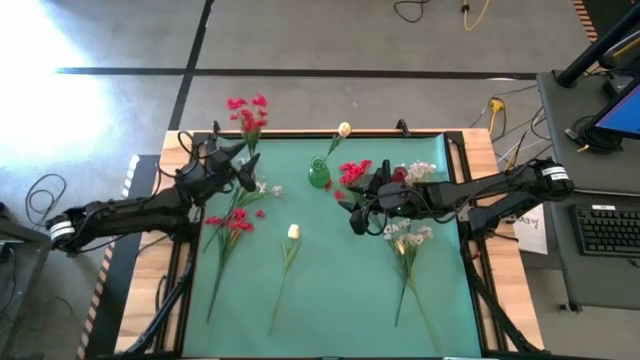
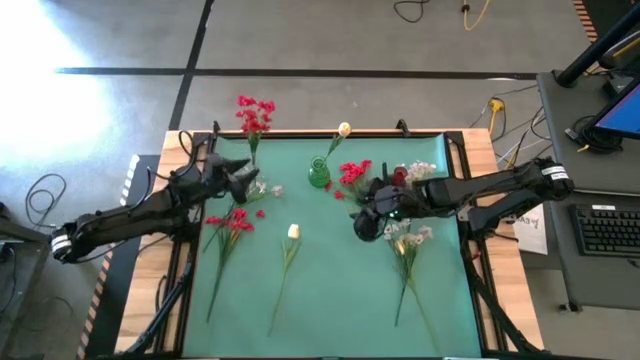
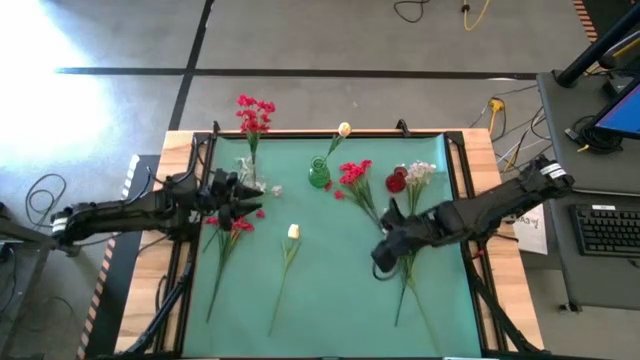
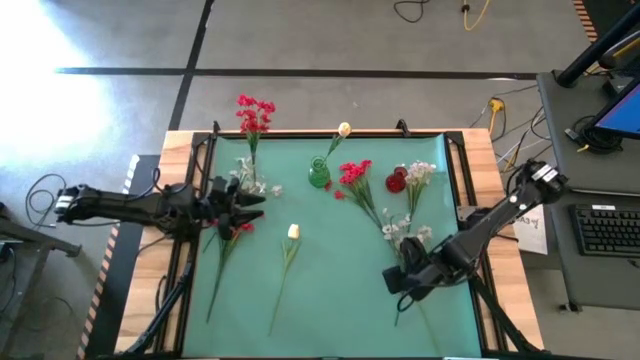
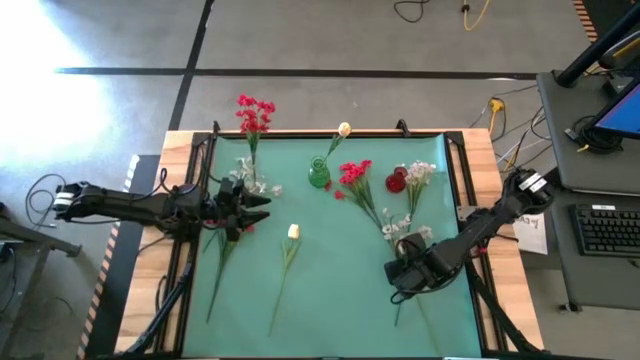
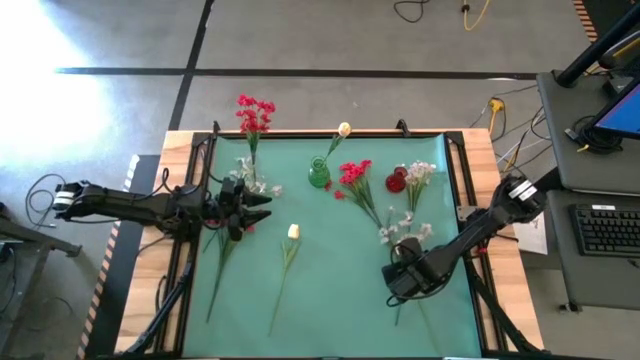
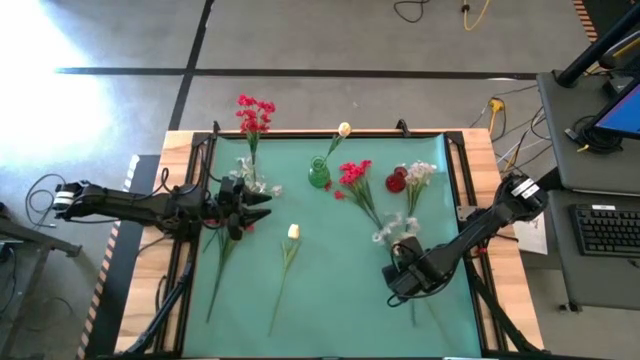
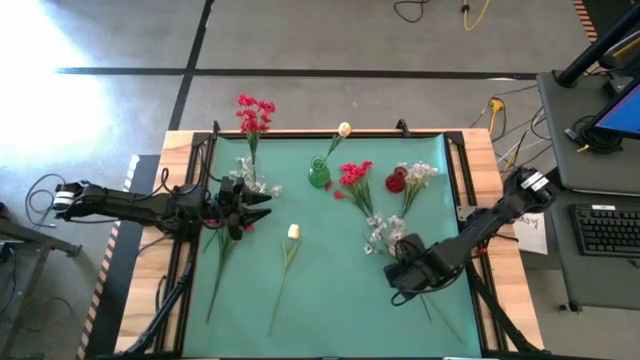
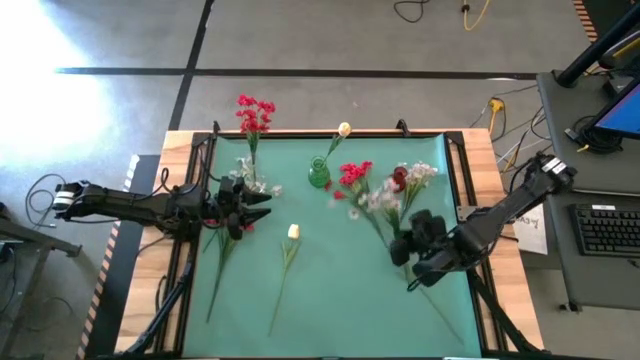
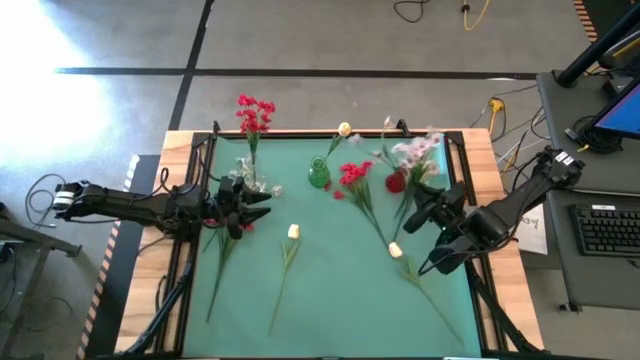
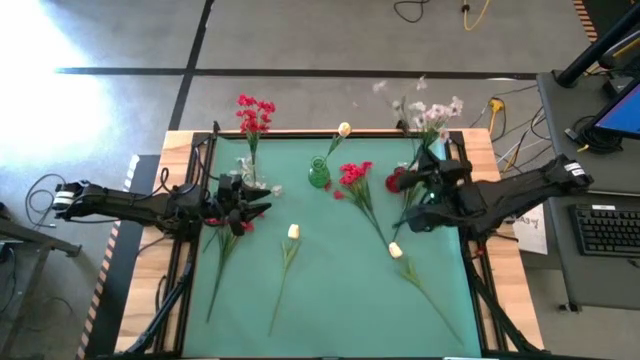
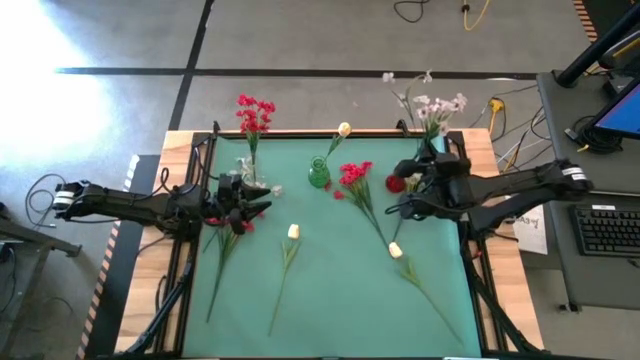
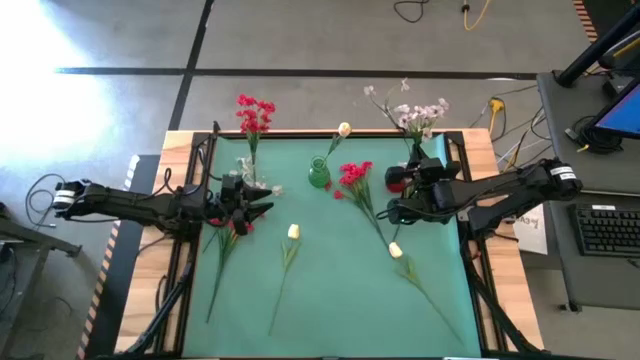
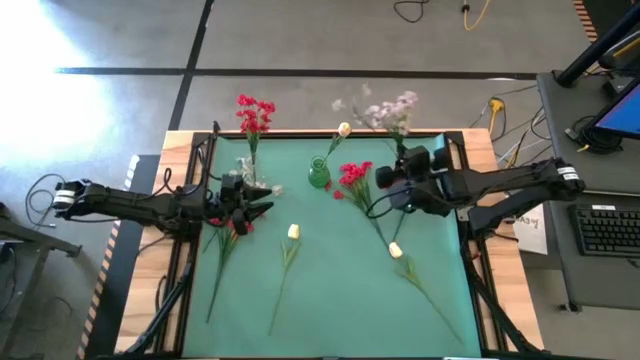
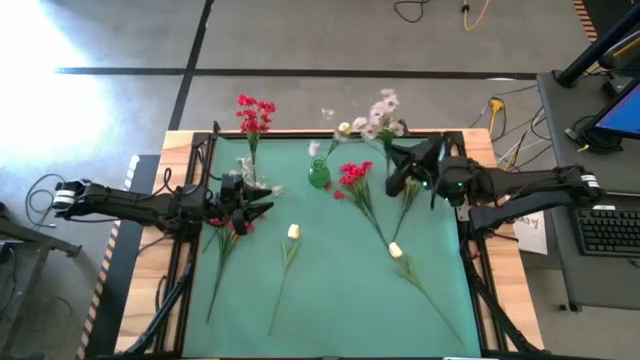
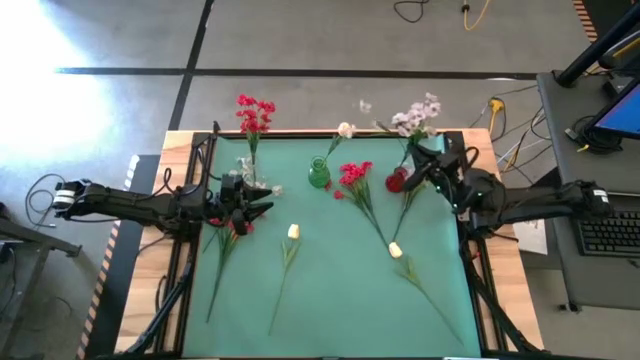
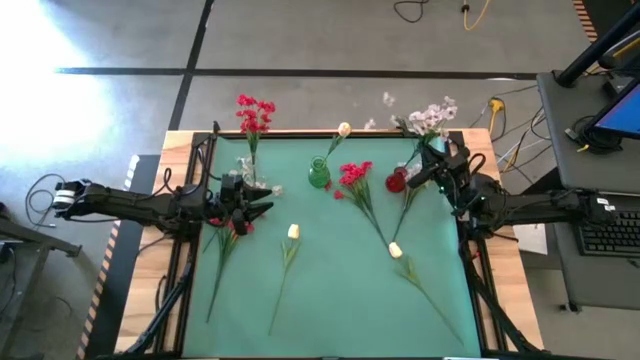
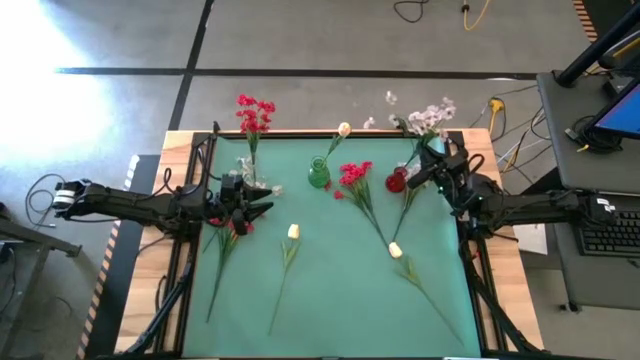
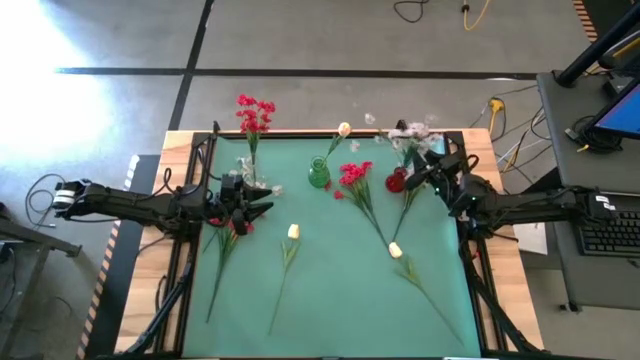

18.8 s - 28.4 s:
Task: Sort flowers into vase by color
Put the bottom white flowers into the red vase

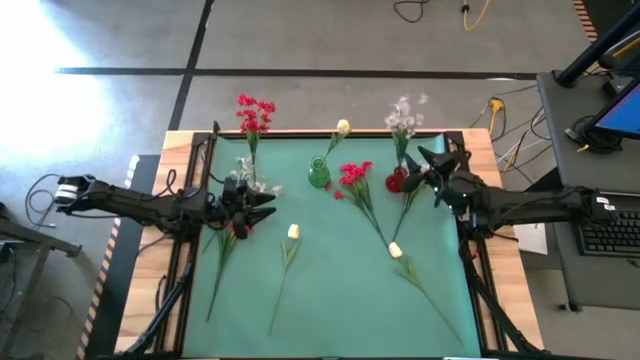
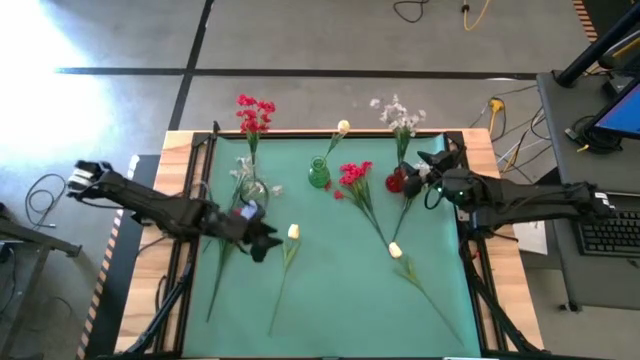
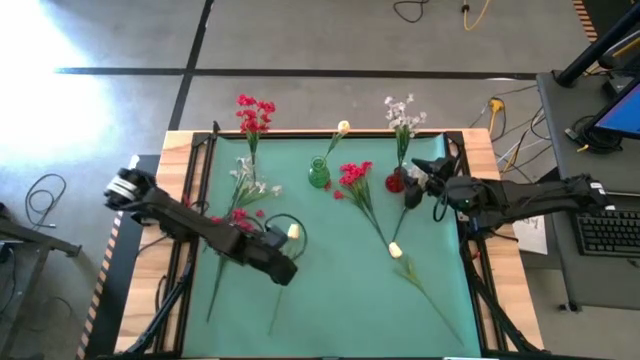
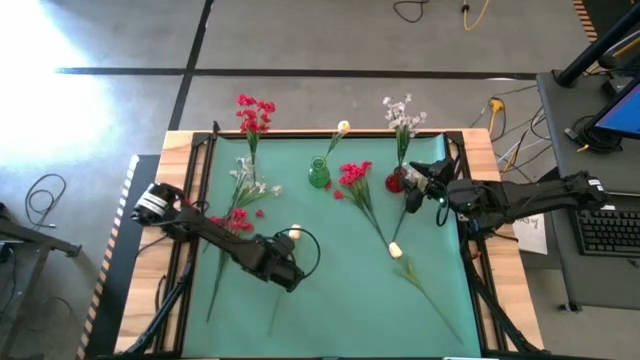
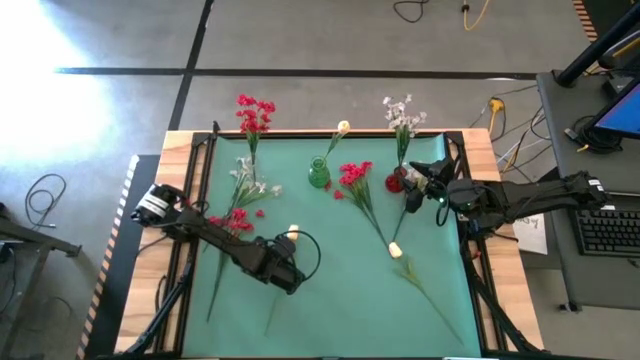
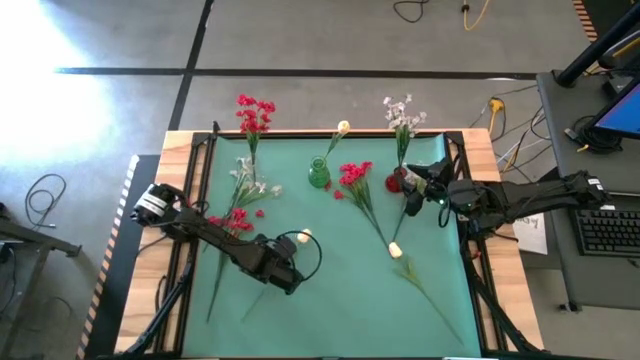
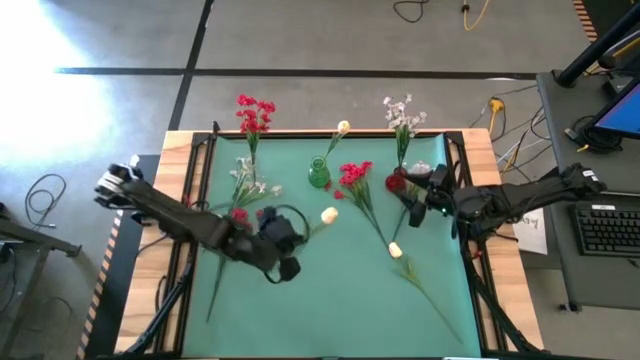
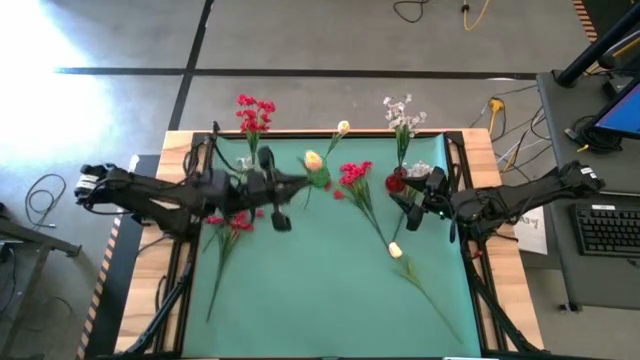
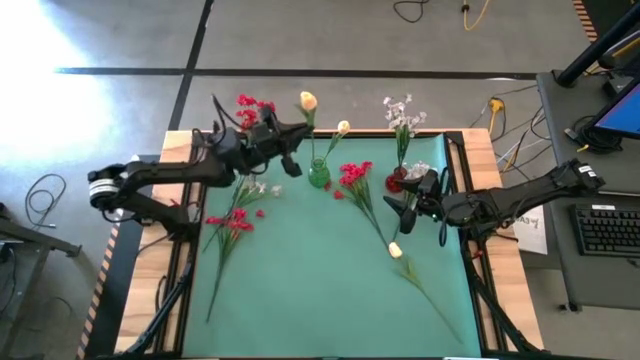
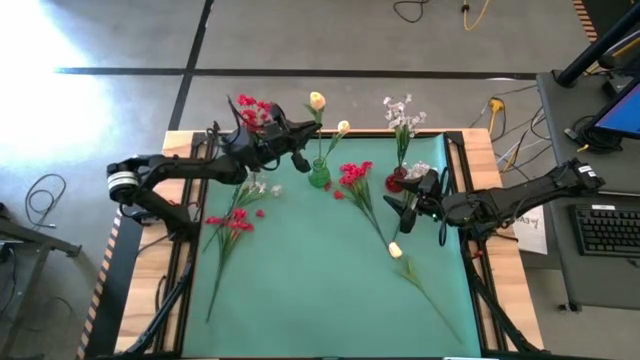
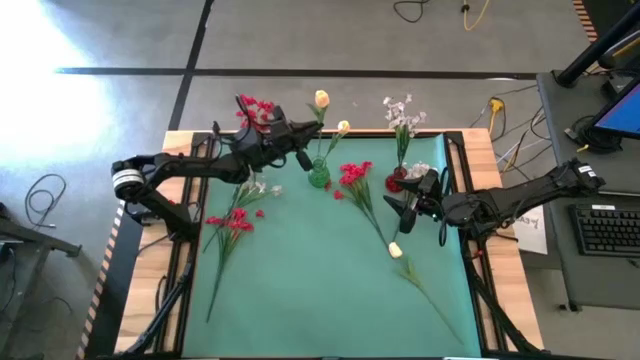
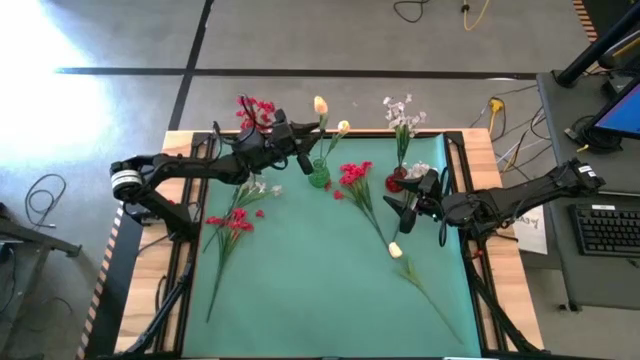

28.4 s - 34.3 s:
Put the left white tulip into the green vase

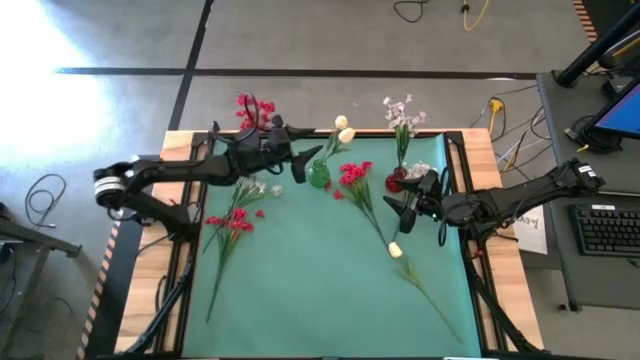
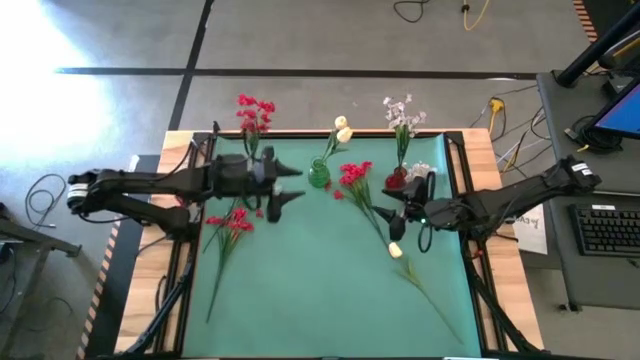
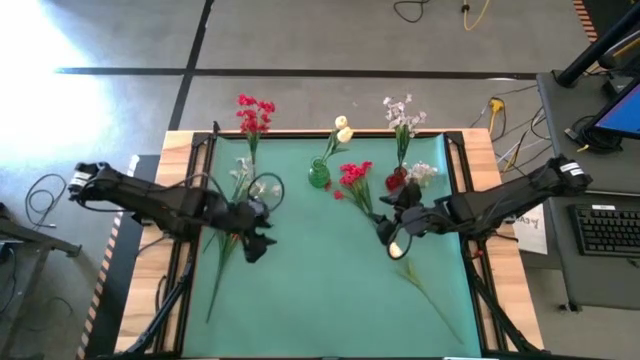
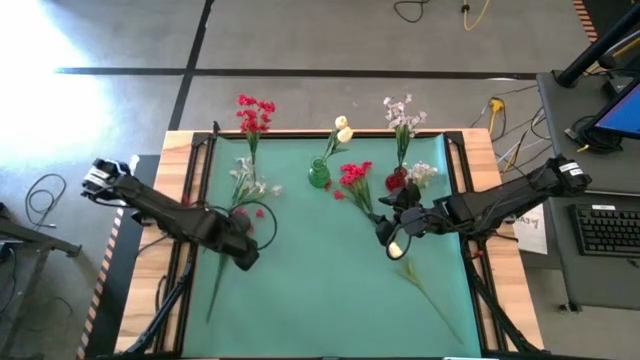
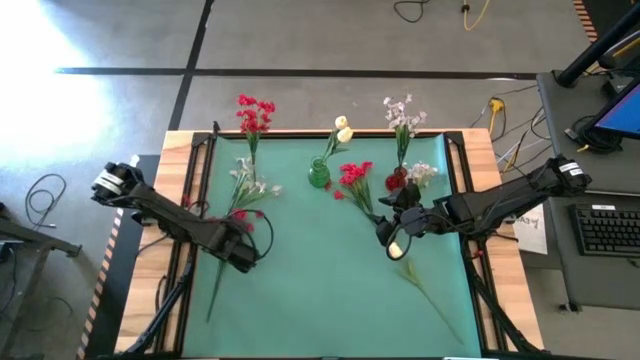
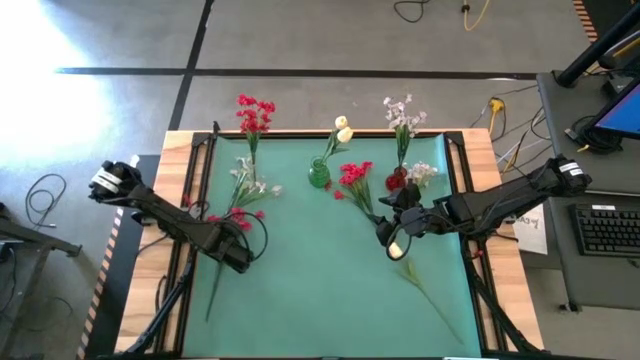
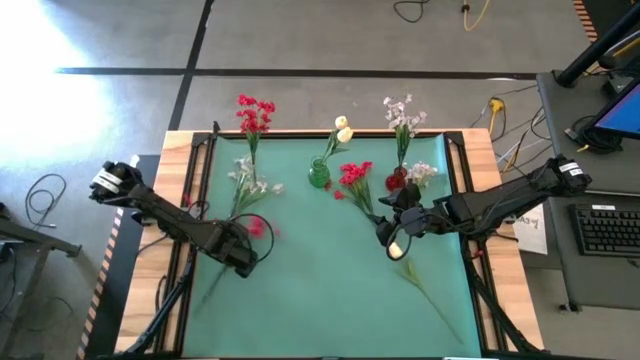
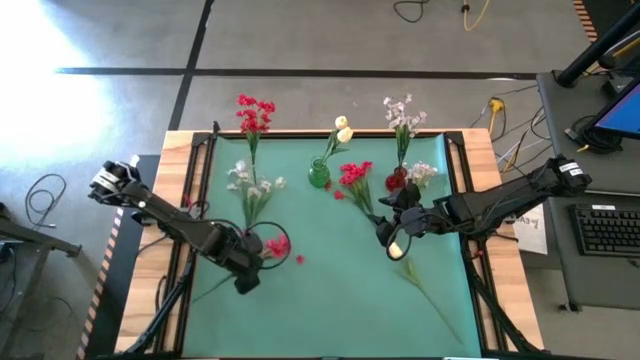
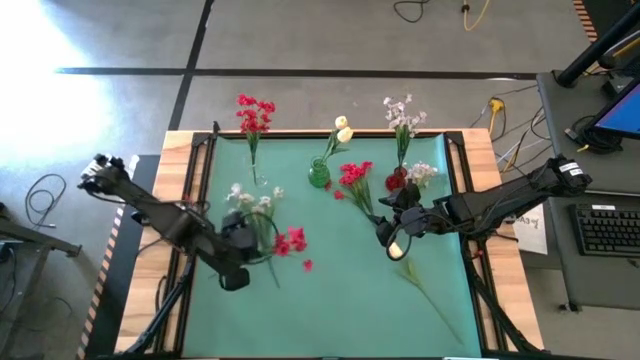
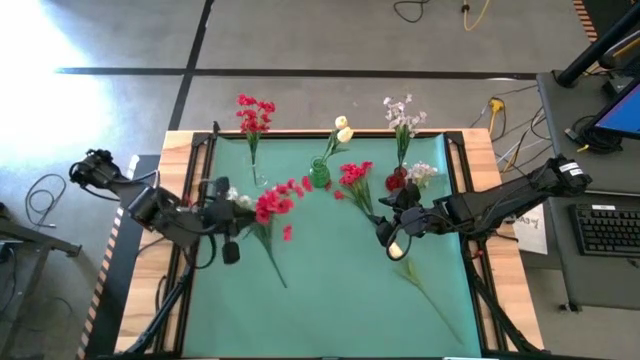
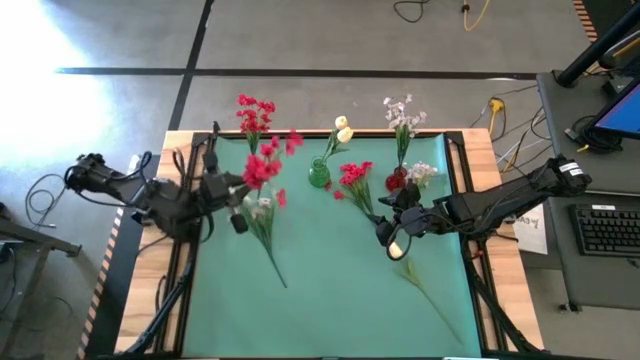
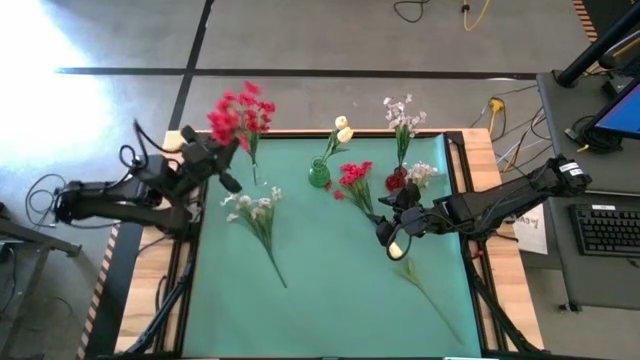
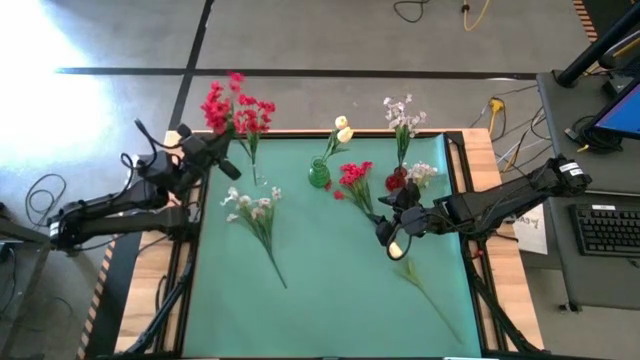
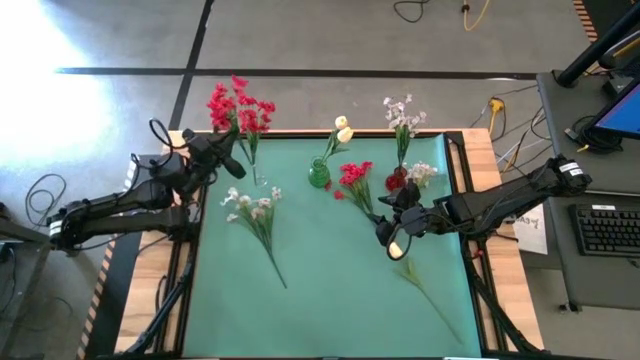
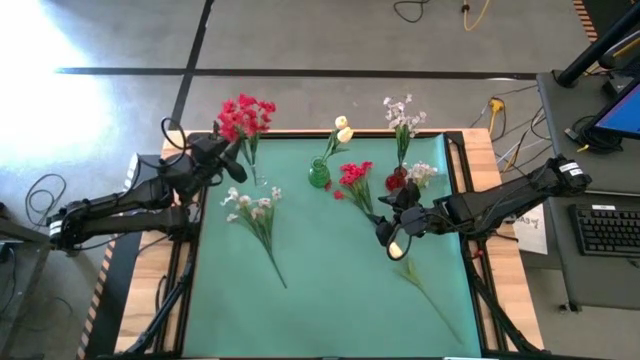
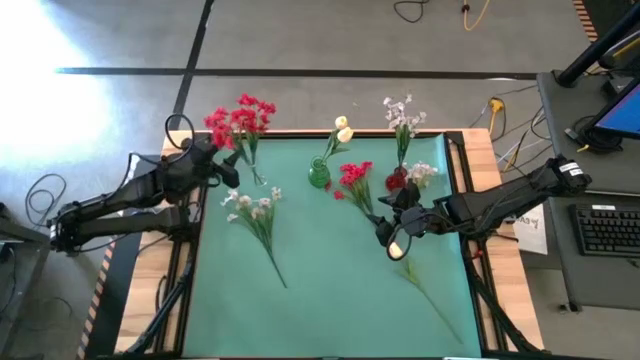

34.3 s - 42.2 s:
Put the left red flowers into the transparent vase
